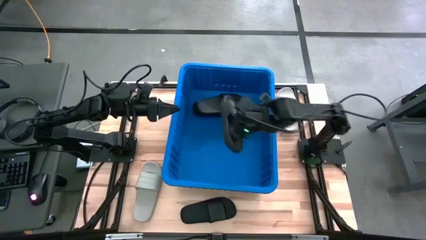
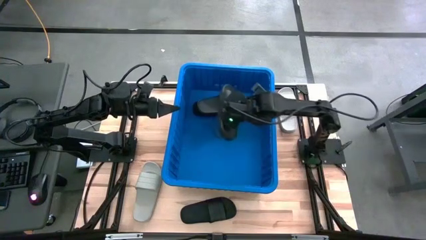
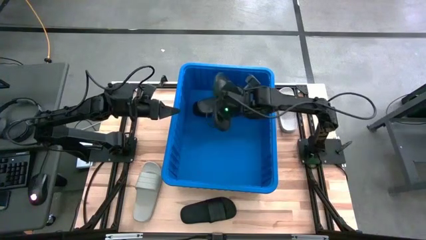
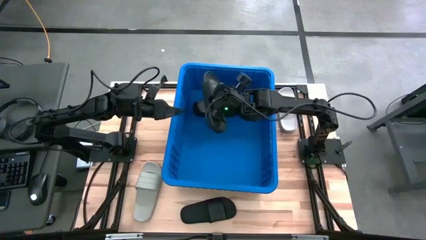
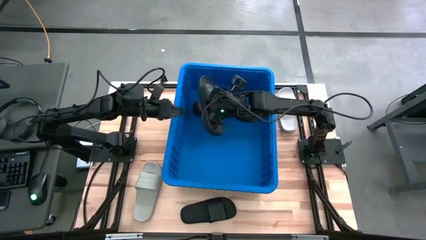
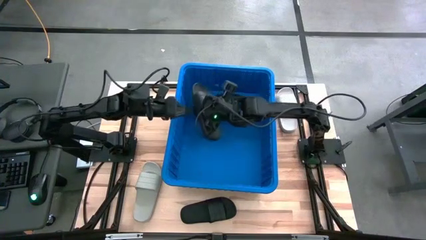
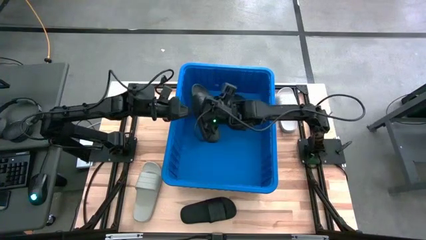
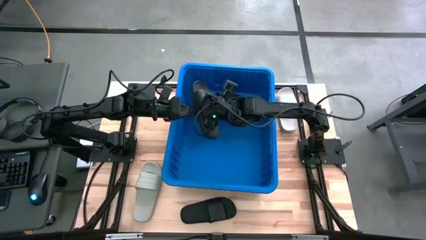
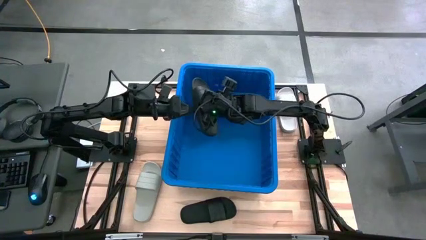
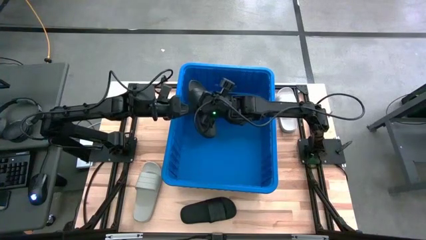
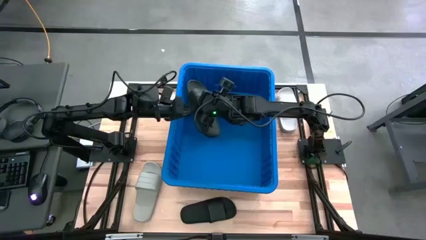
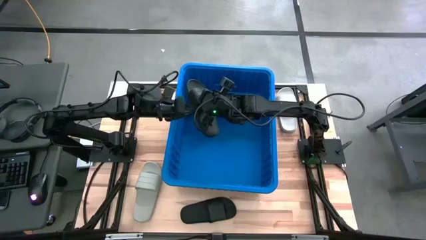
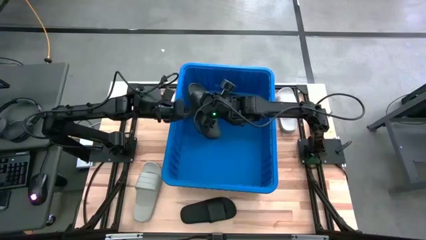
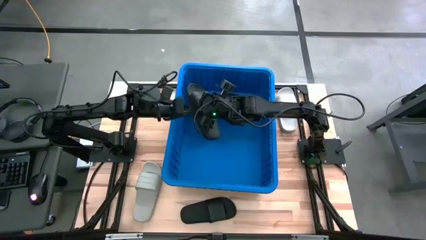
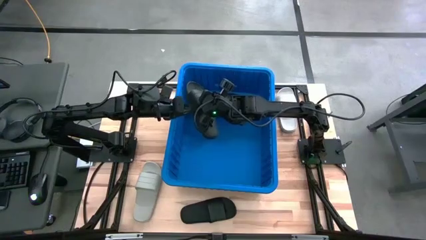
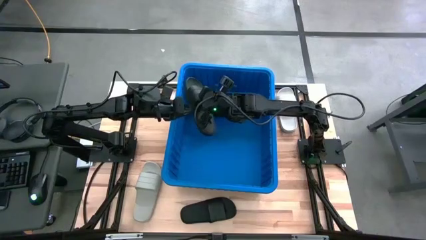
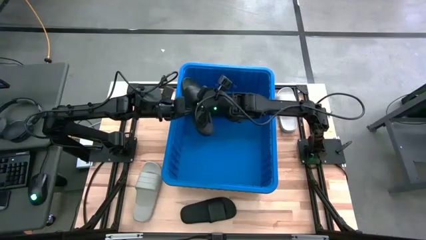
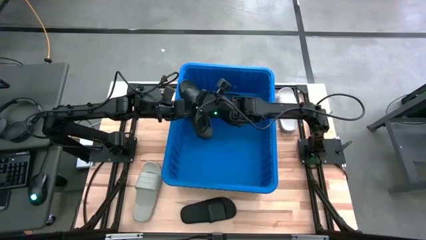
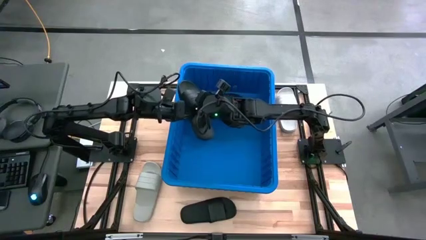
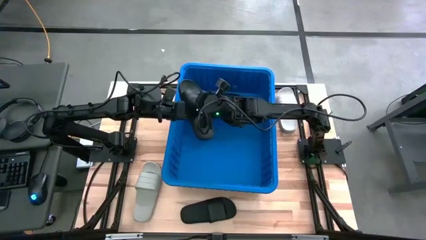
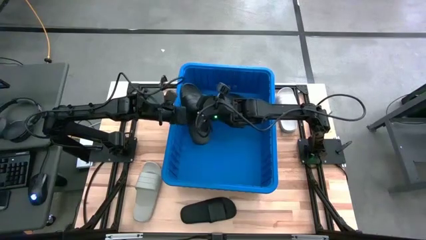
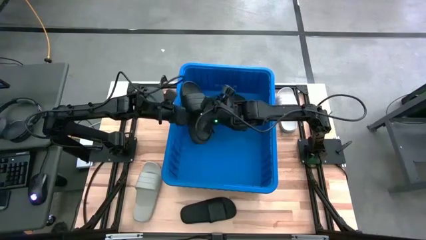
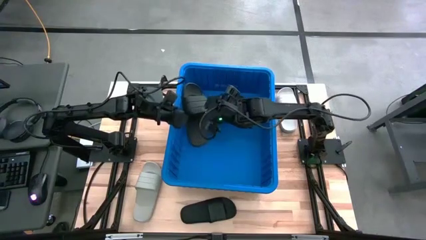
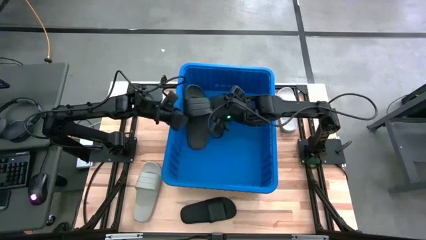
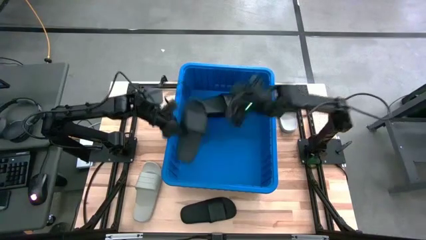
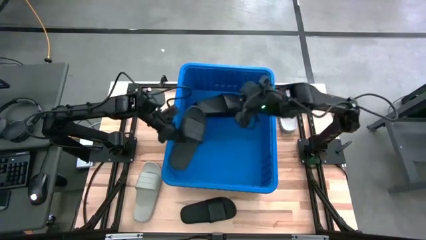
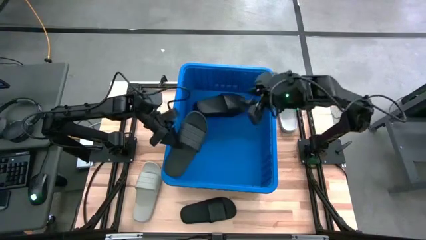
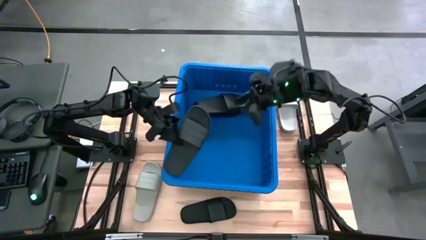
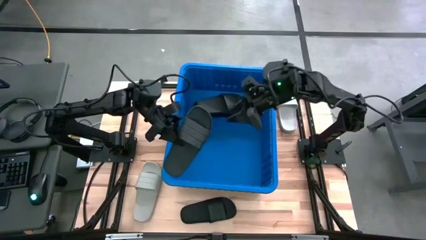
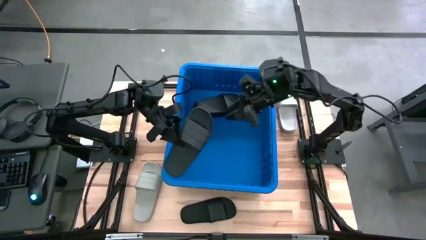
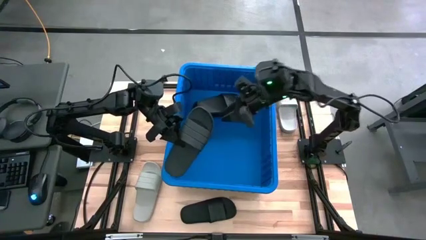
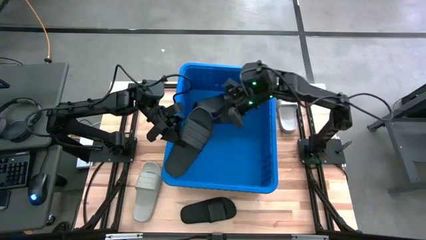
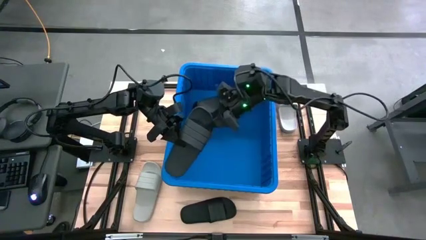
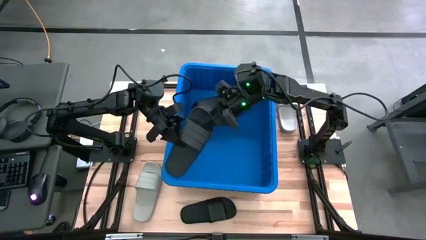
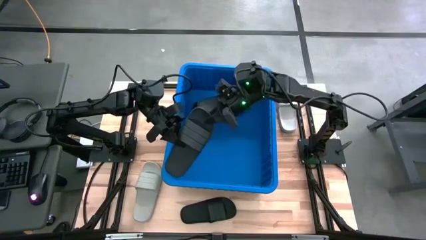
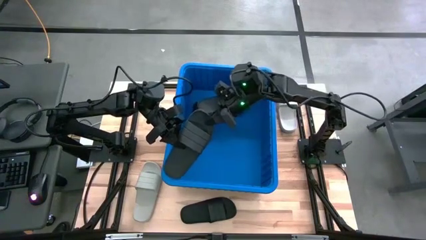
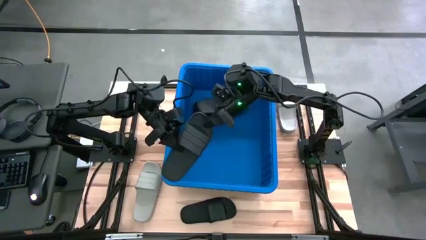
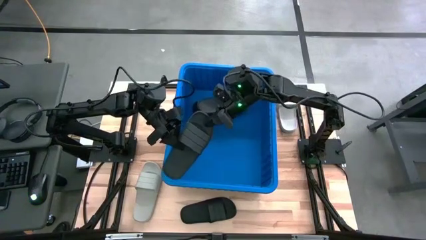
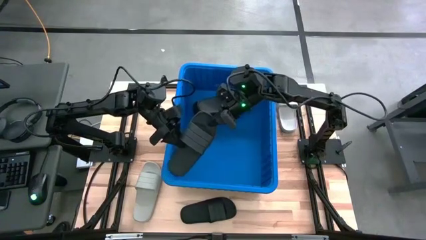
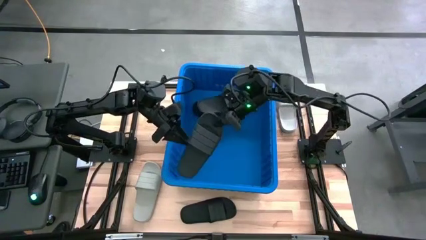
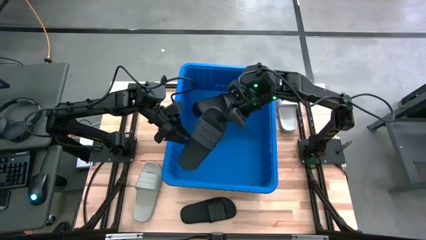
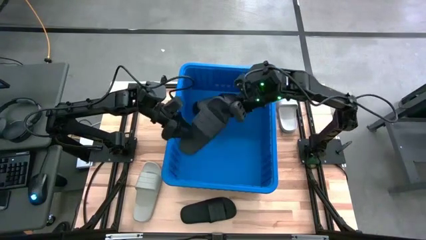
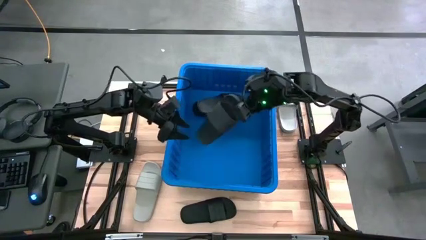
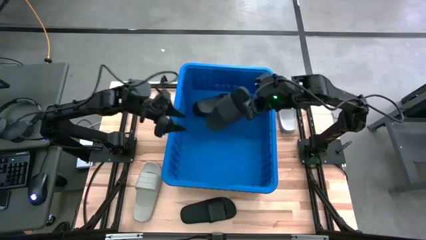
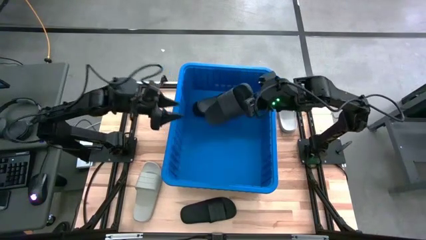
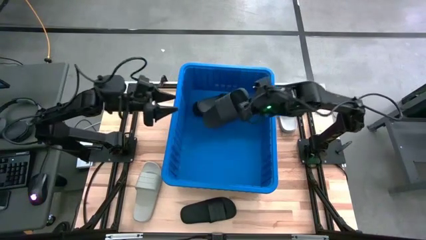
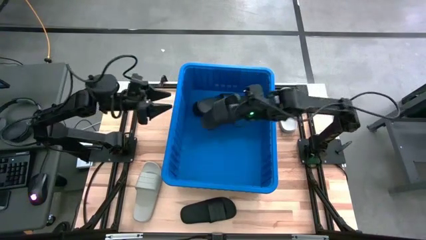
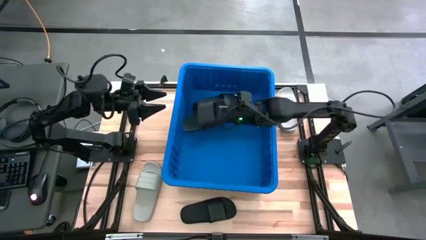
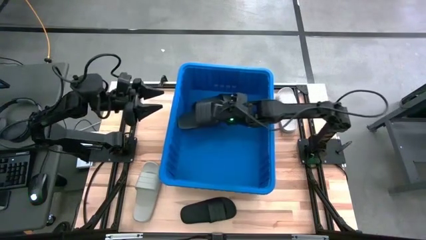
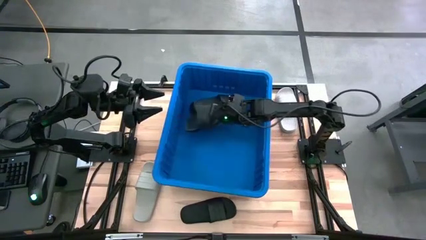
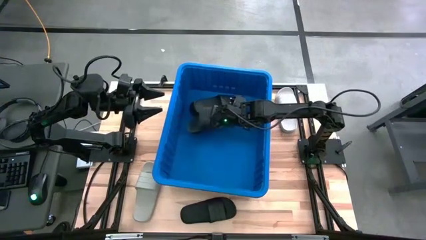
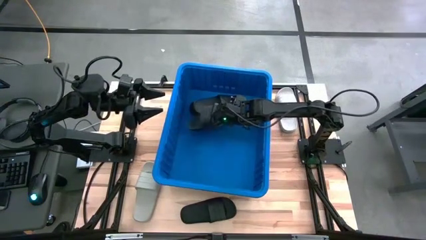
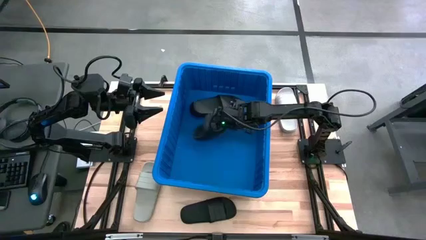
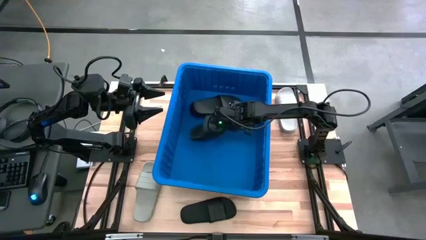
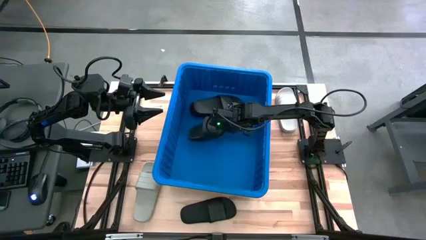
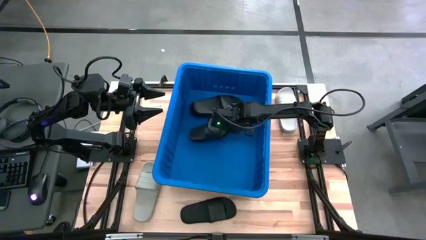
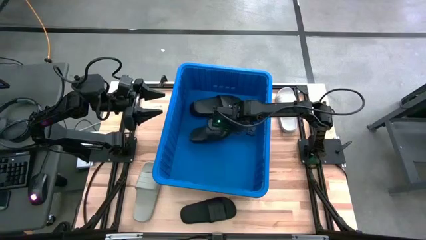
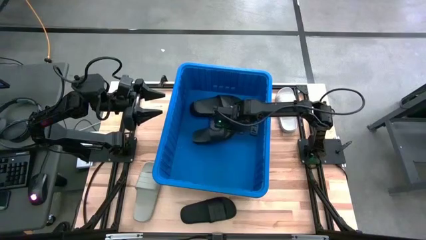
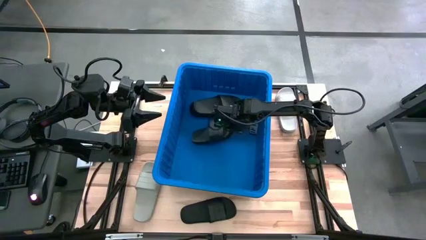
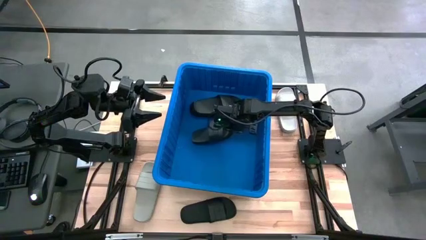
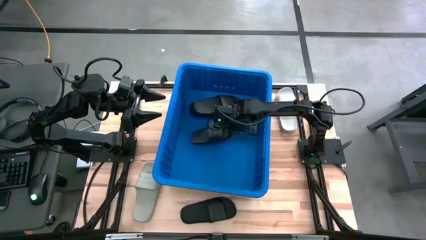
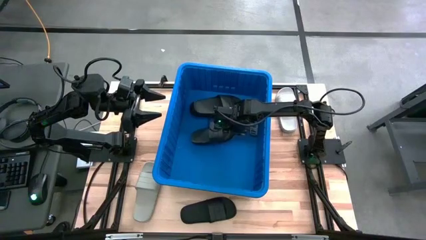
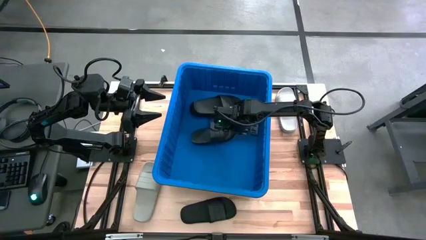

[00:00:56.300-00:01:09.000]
Task: Pick and place slides into bin
Put the black slide into the blue container

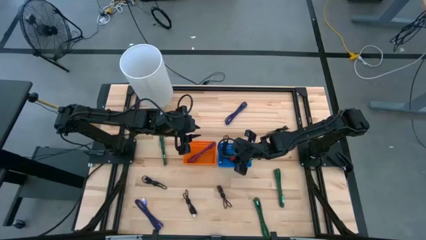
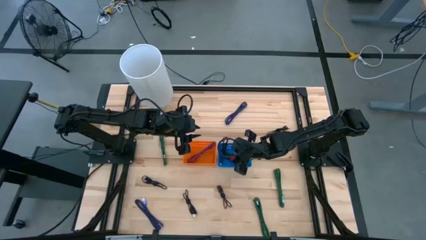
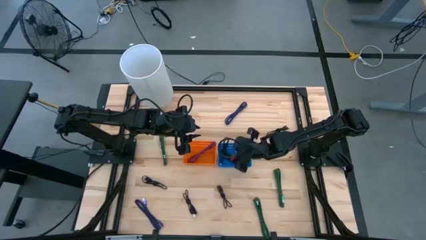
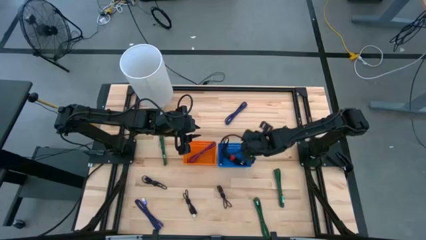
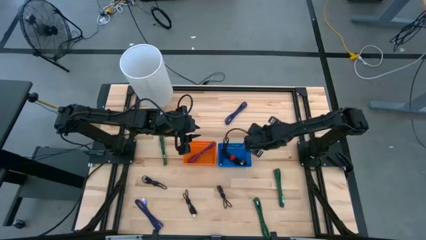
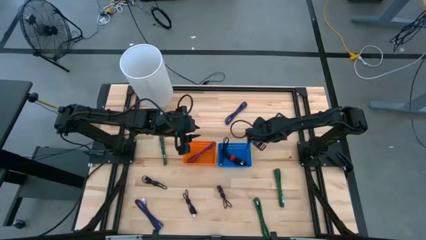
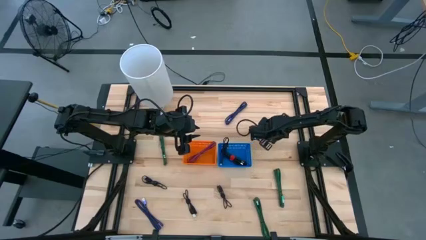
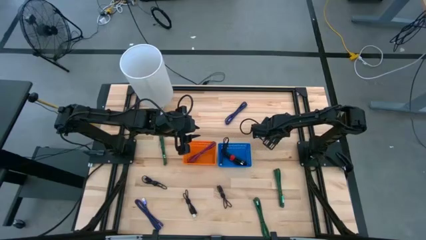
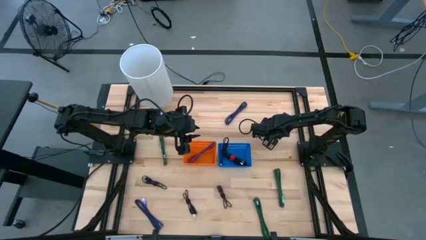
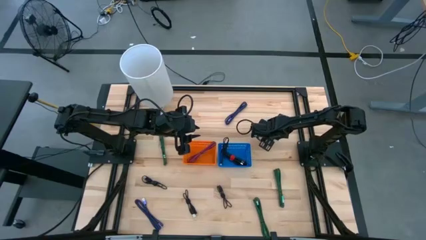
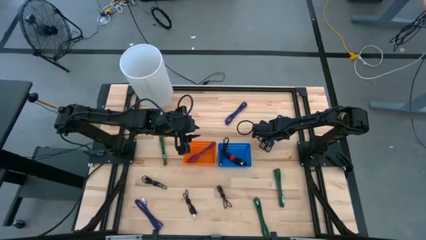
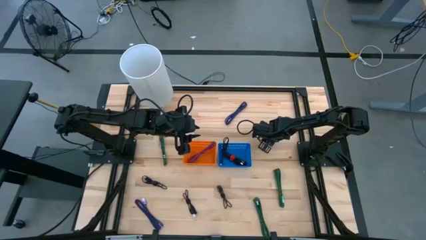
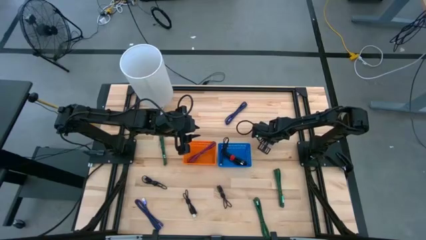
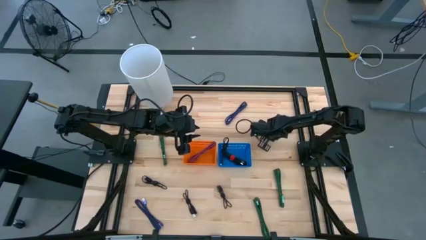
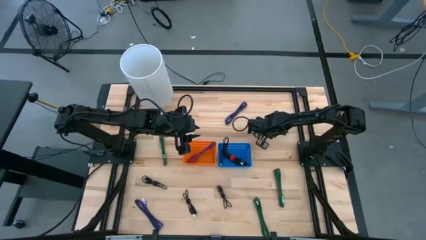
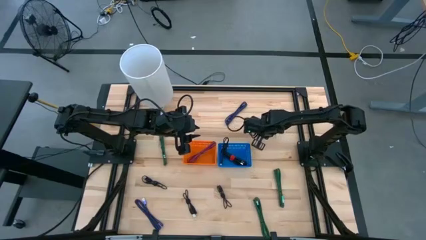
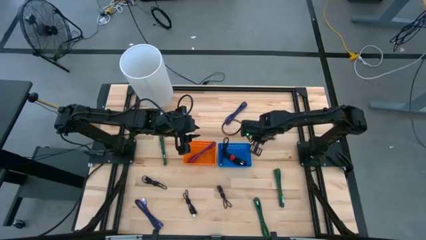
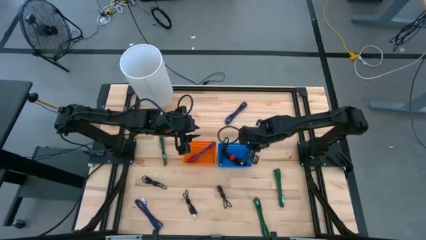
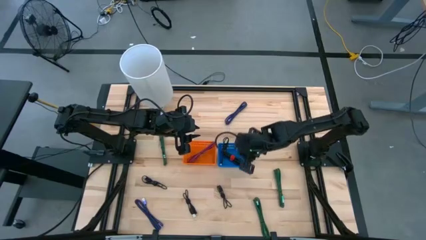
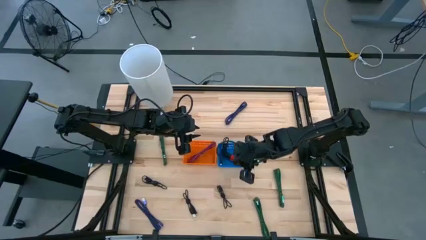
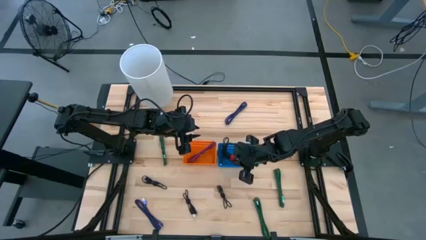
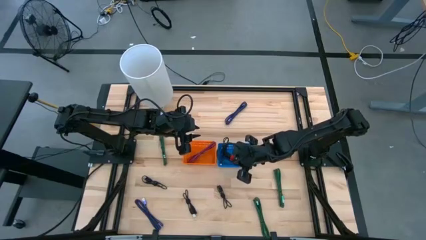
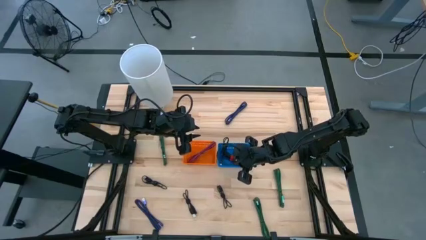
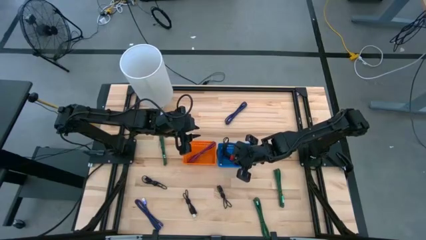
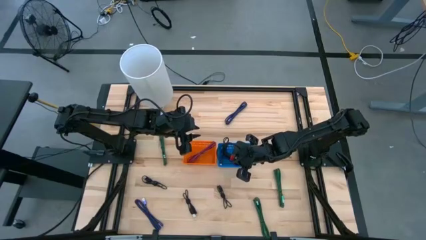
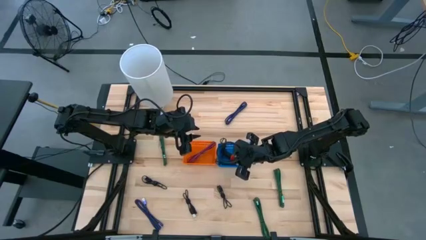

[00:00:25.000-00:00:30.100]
Task: Pick & Place USB Port
Put the black charger cable into the blue bin
